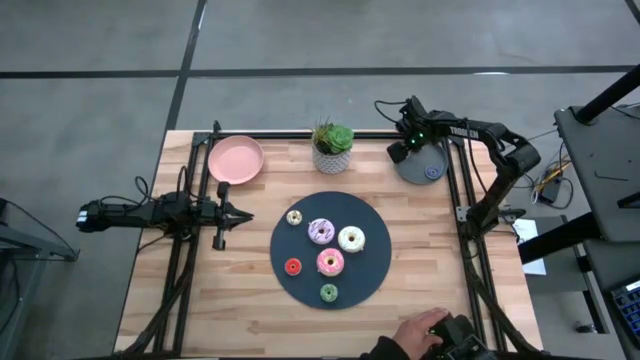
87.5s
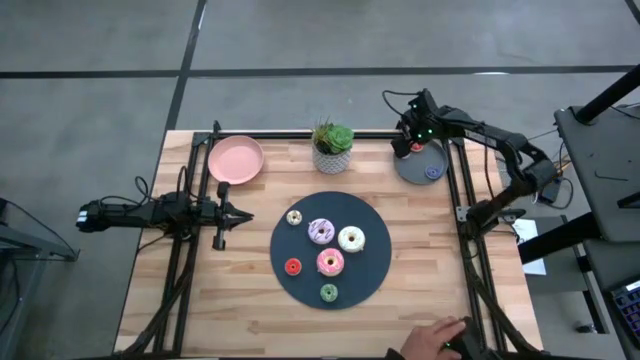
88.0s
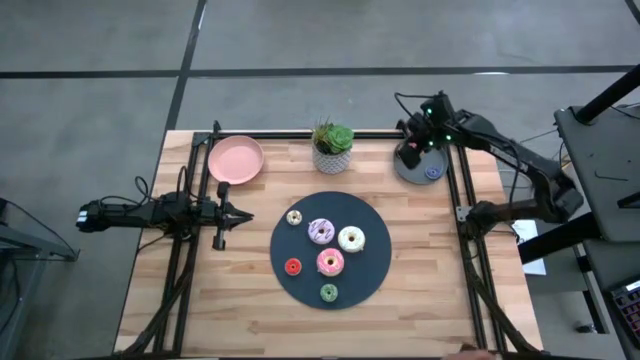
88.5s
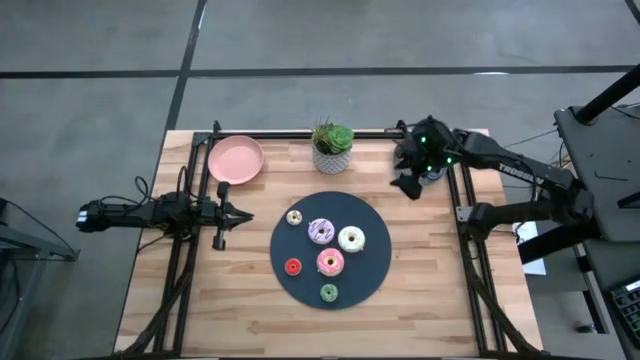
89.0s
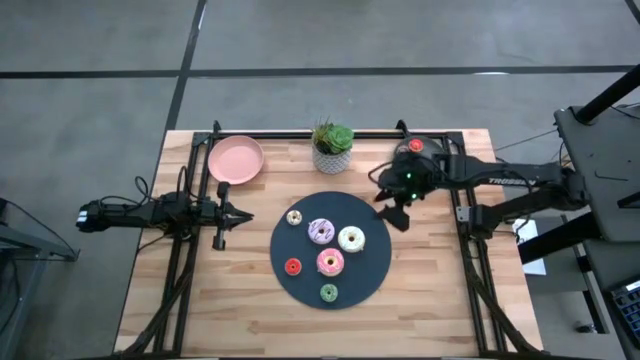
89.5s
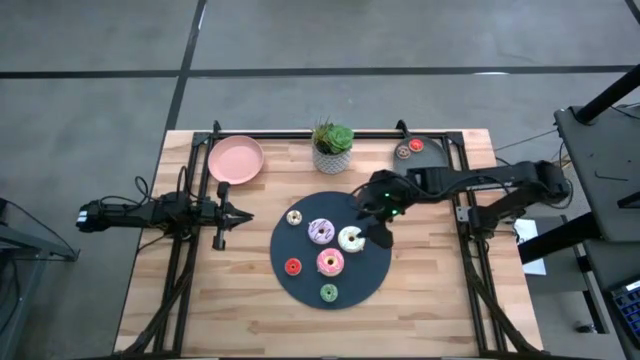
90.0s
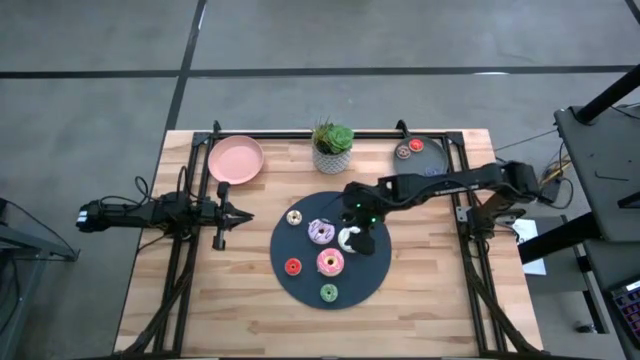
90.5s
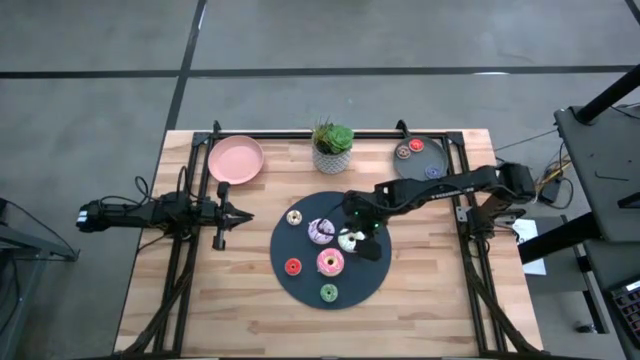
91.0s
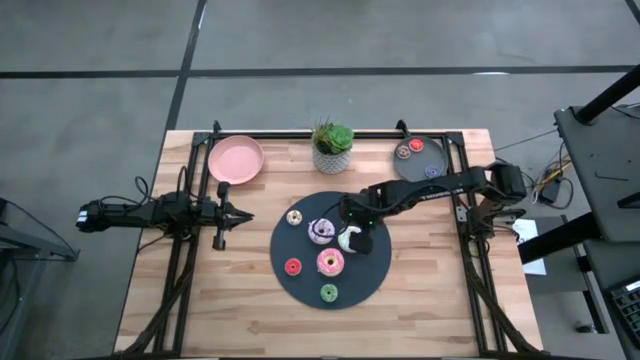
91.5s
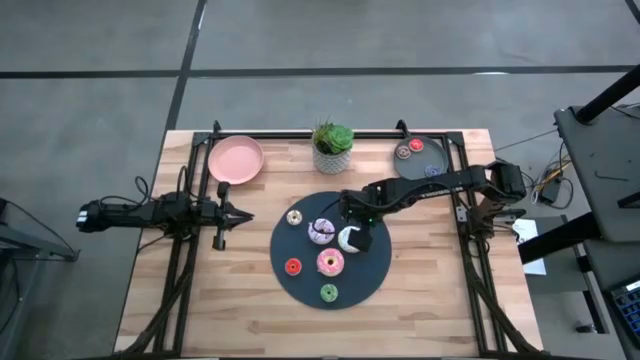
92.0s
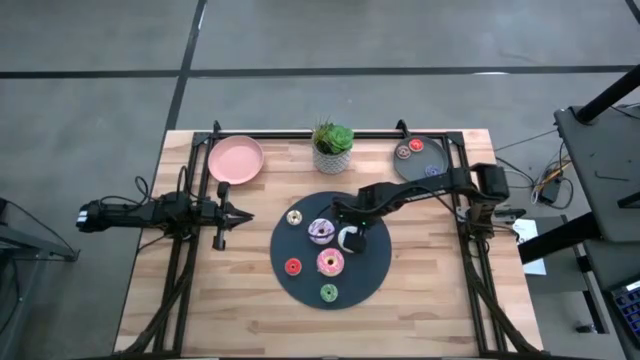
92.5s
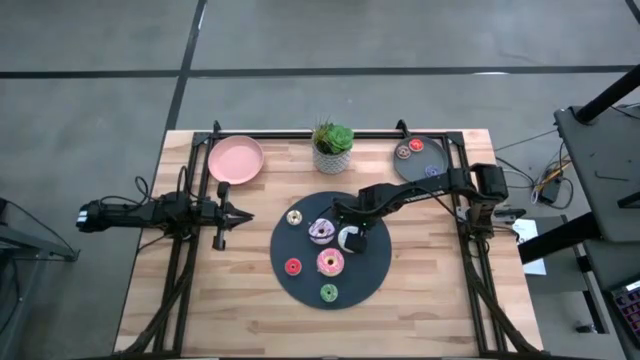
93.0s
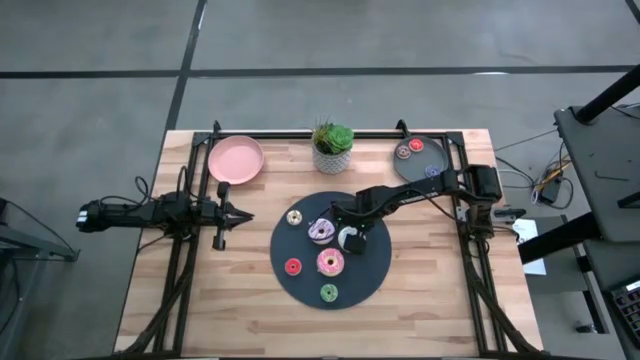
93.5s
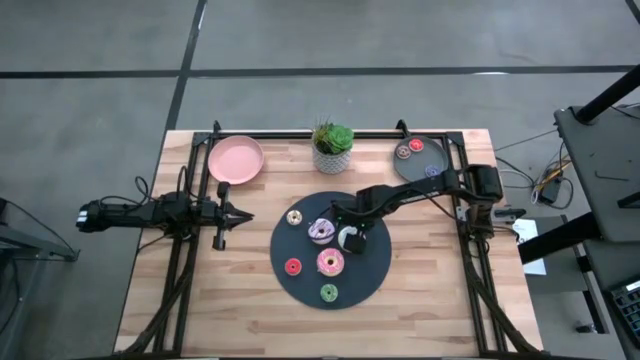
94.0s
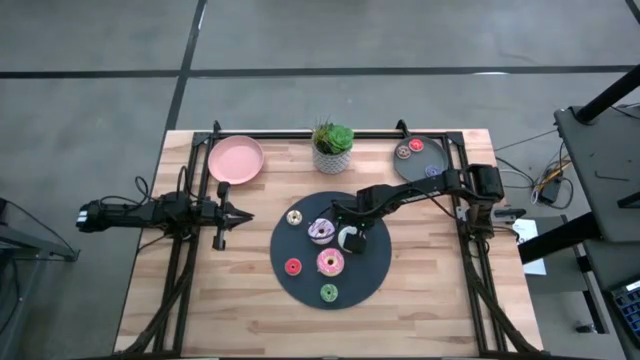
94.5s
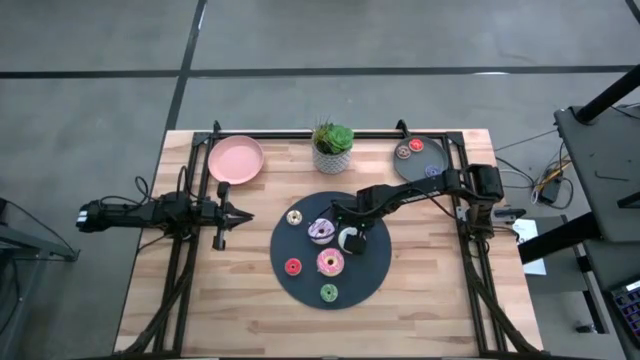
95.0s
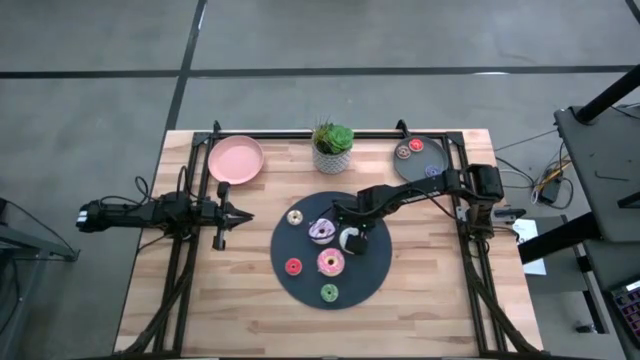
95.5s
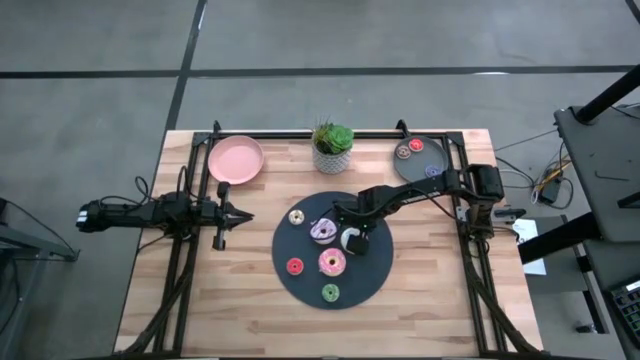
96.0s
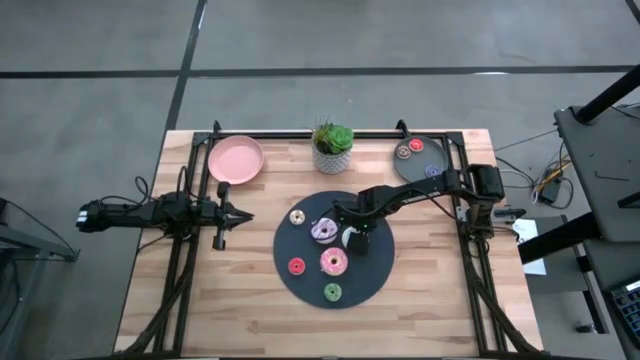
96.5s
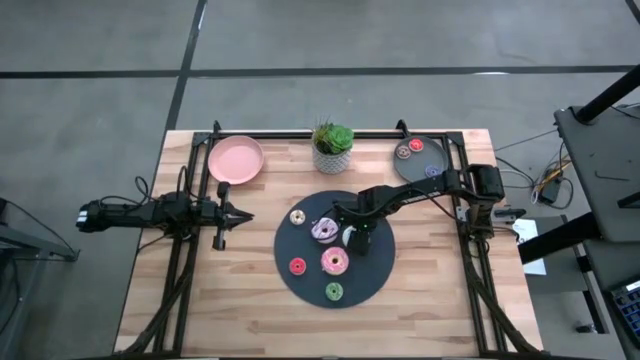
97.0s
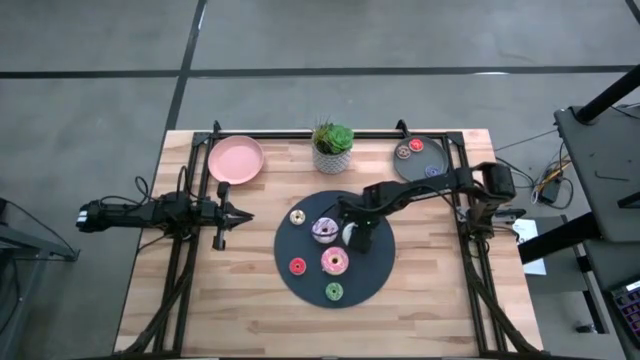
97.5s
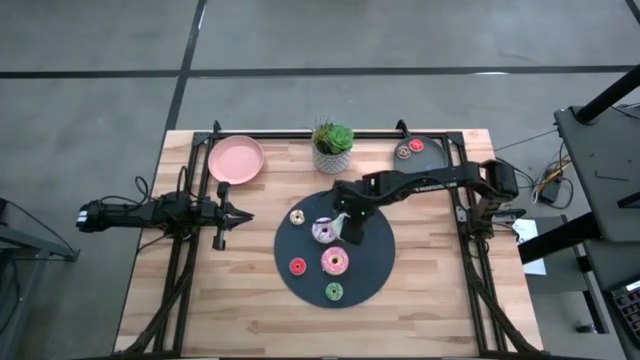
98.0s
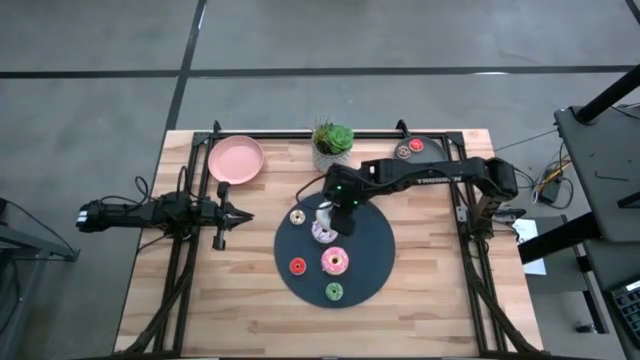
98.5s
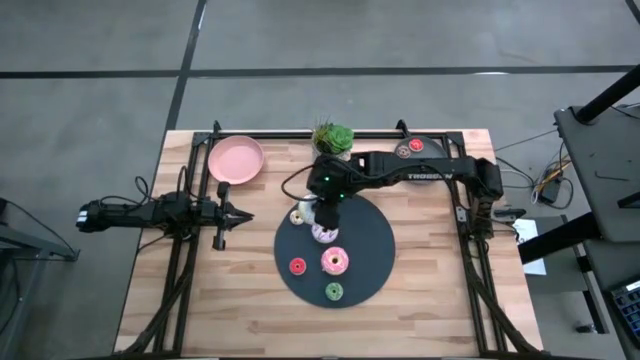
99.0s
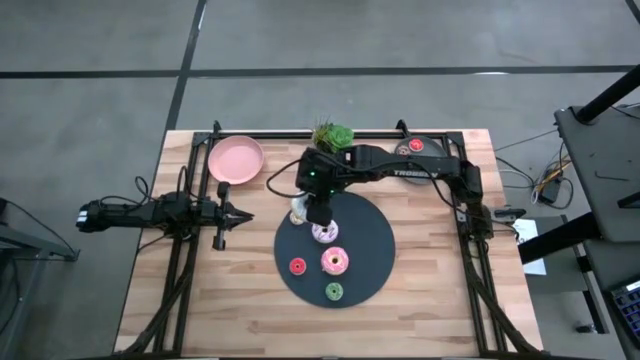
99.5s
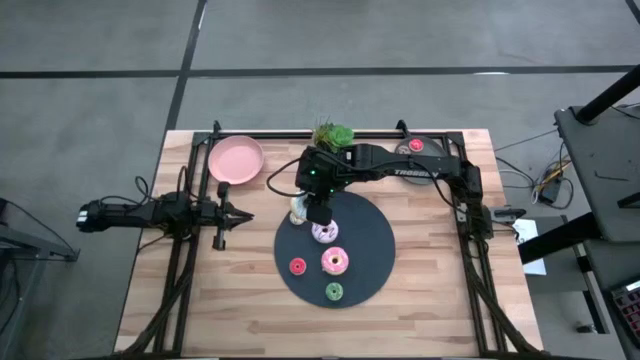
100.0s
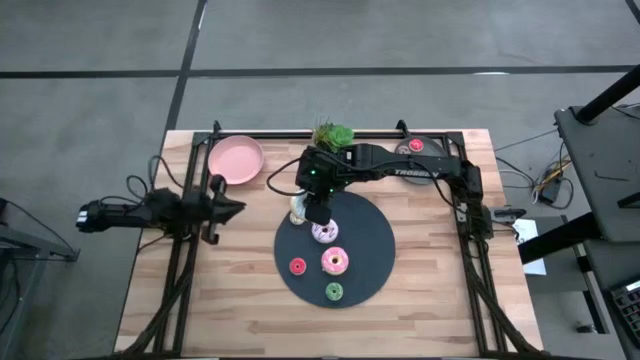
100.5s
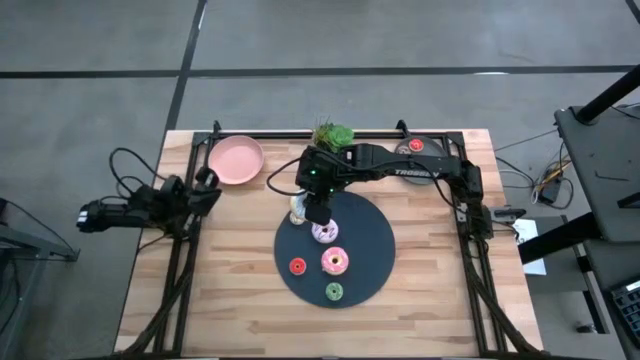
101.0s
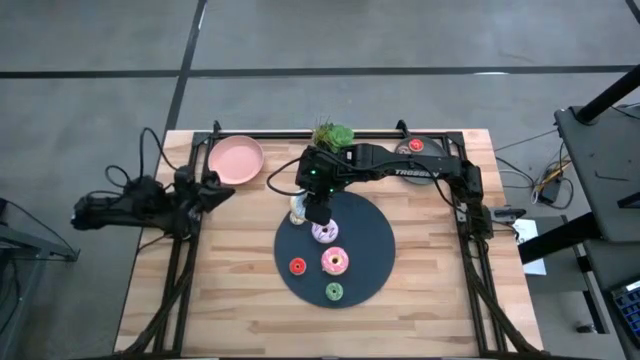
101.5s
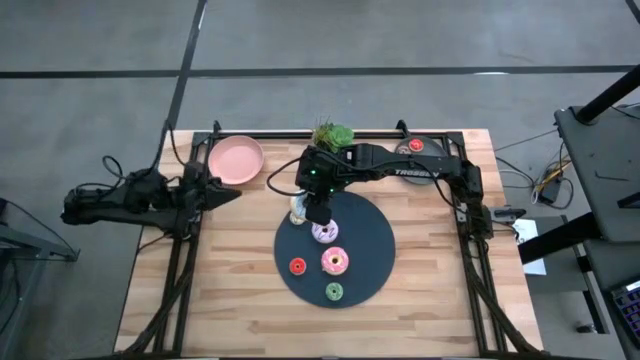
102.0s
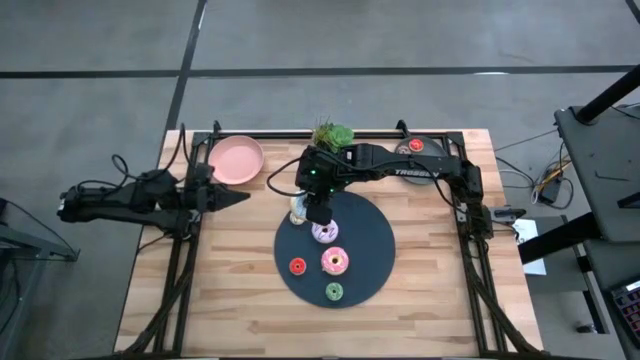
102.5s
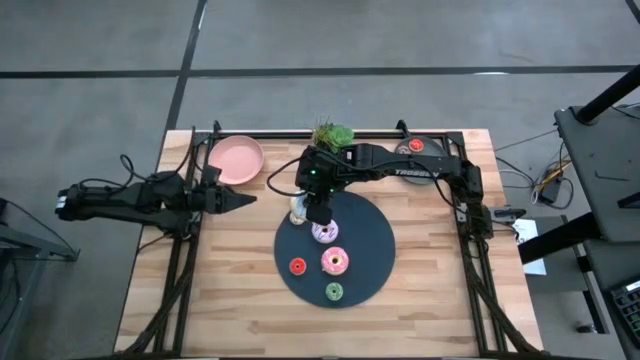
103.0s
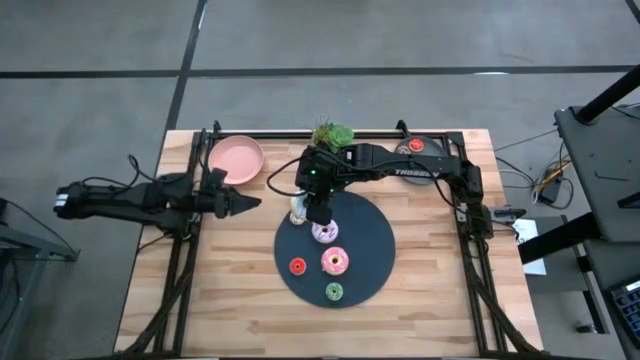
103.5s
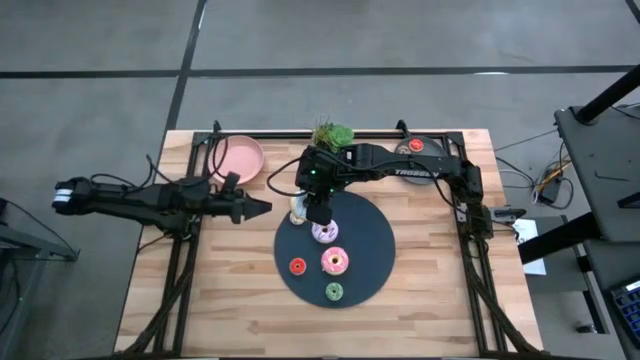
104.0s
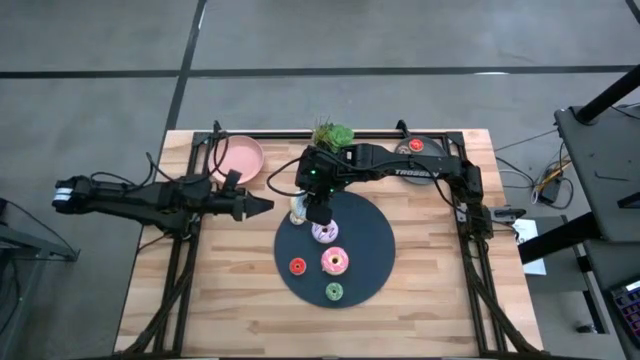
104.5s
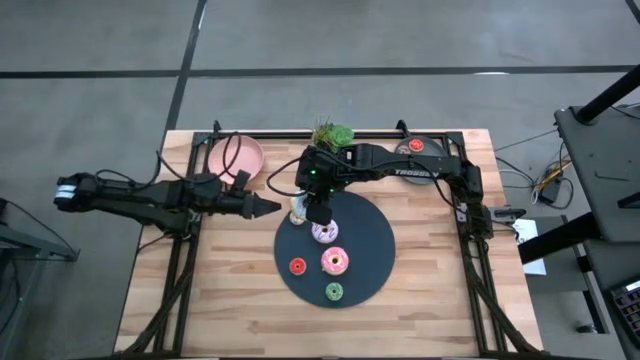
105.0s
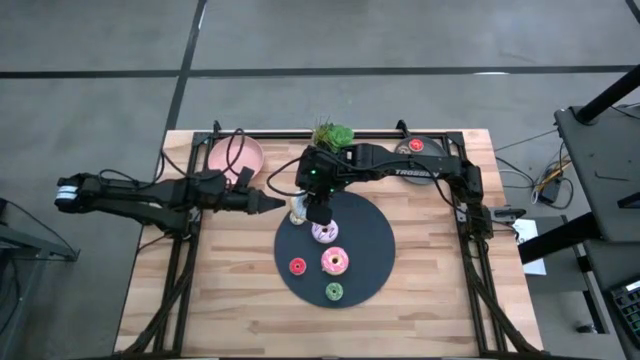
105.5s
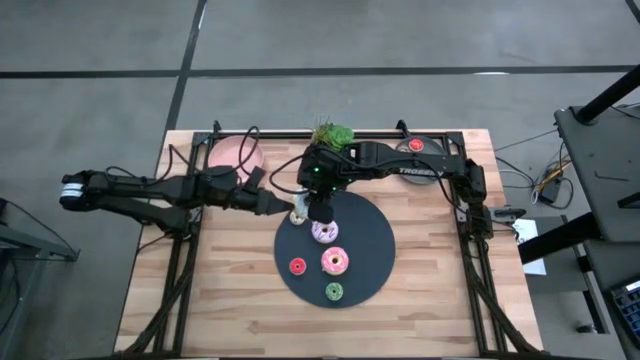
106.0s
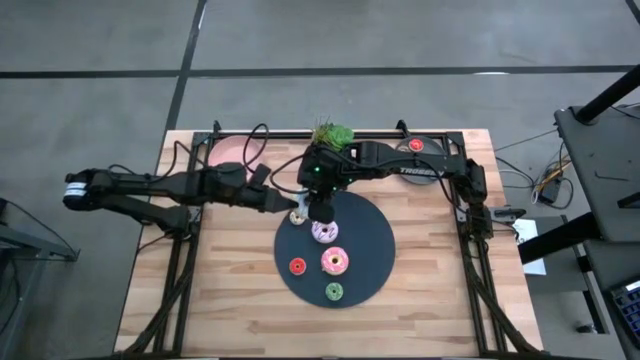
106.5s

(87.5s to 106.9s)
Task: Pick & Place donuts
Put the large white donut on the pink plate

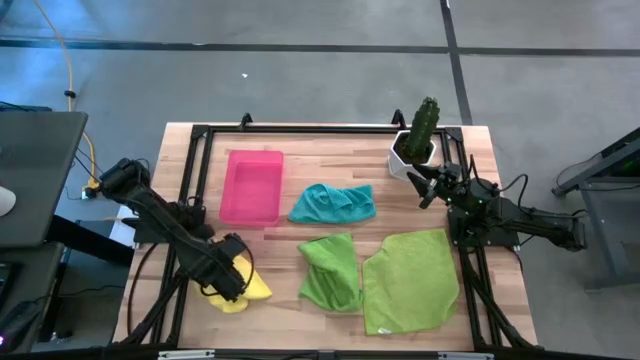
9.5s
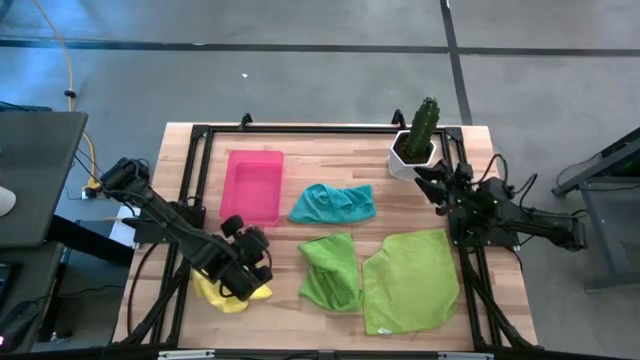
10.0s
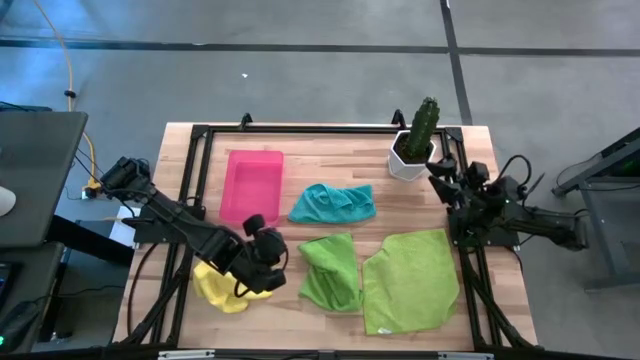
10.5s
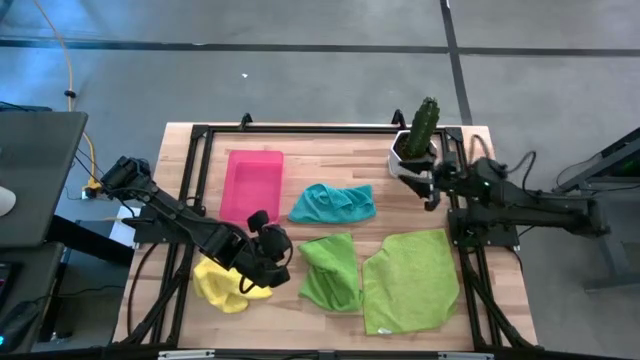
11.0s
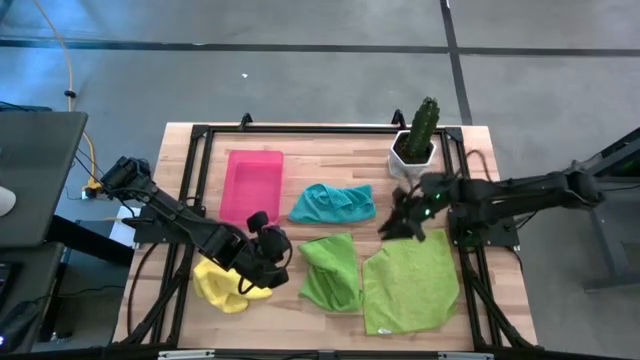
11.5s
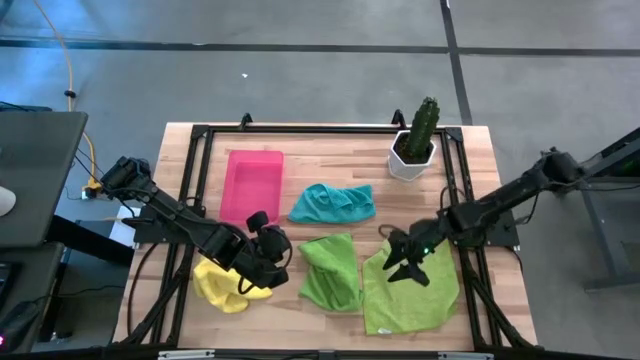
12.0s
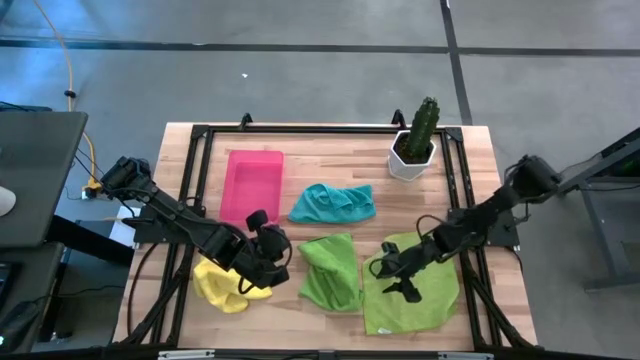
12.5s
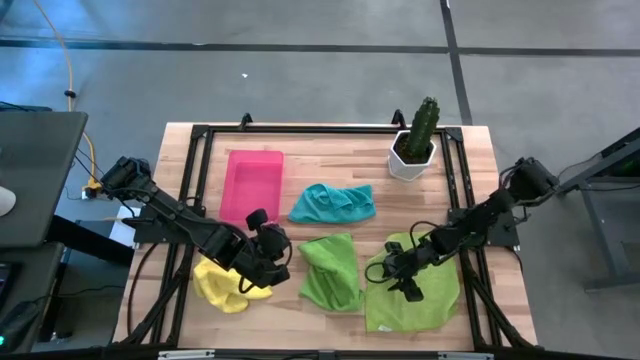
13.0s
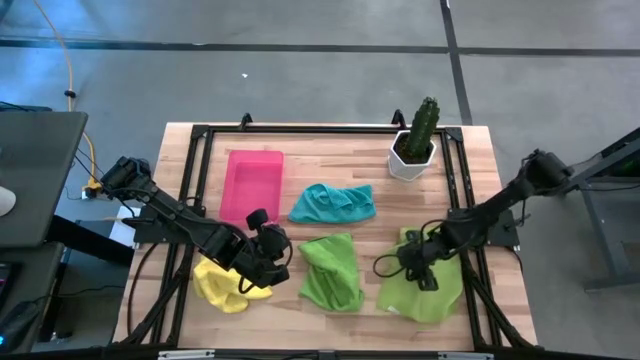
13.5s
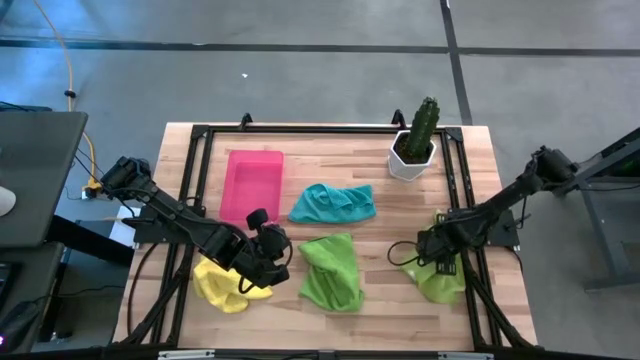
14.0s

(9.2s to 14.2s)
Task: Roll microfiber towels into tight, uniform cylinder then place into a basket
Adjust the light green microfiber cloth
